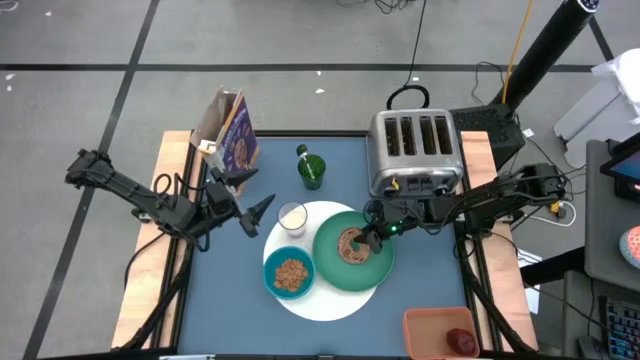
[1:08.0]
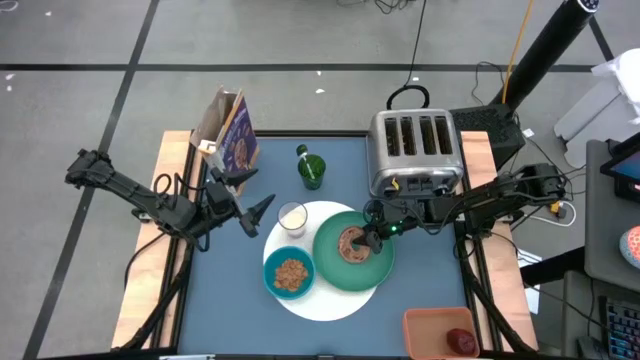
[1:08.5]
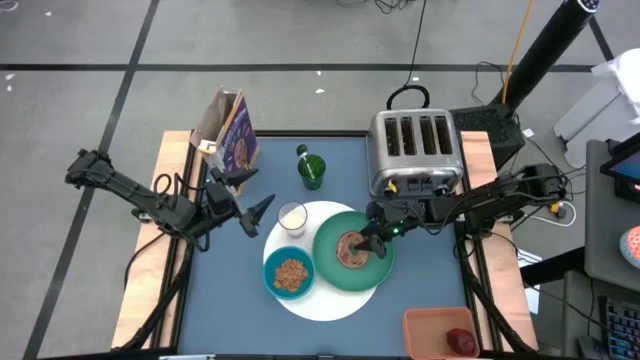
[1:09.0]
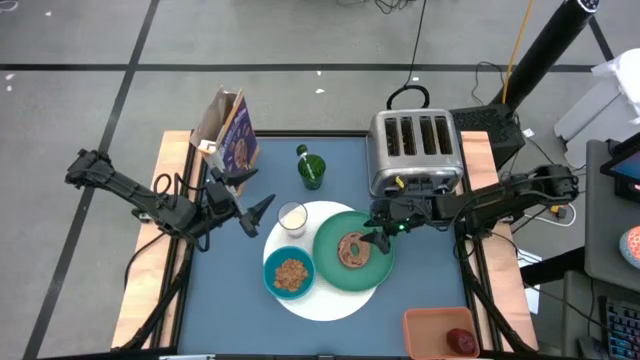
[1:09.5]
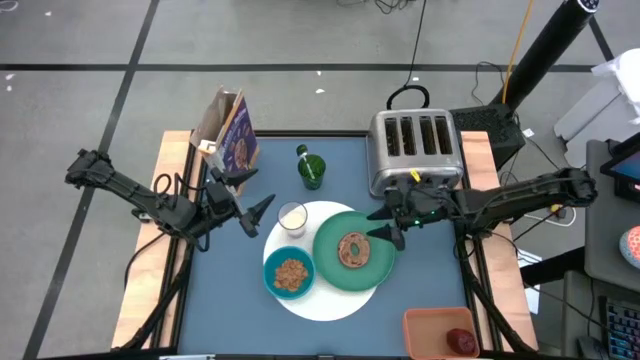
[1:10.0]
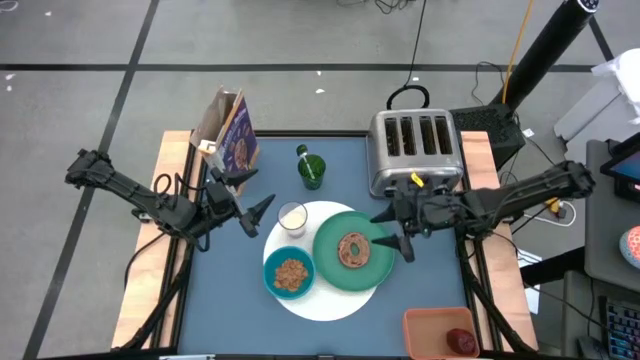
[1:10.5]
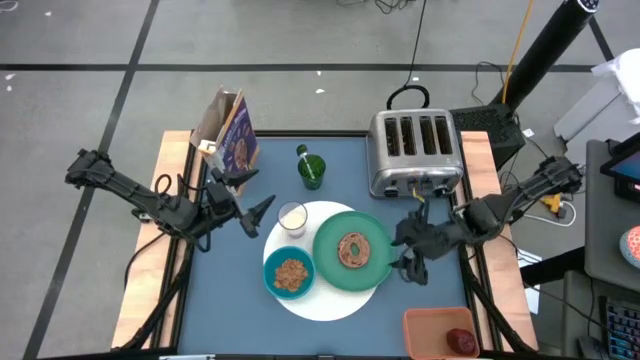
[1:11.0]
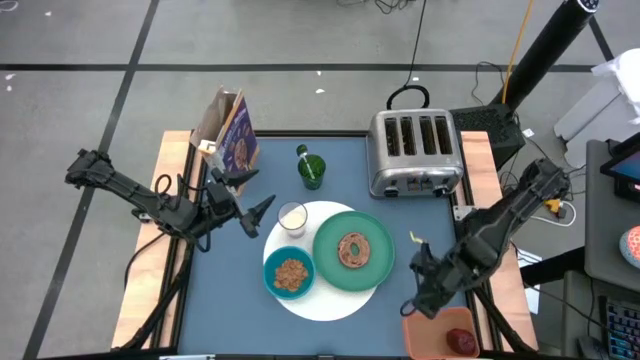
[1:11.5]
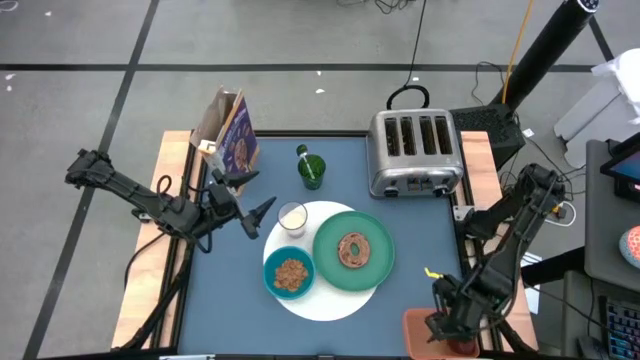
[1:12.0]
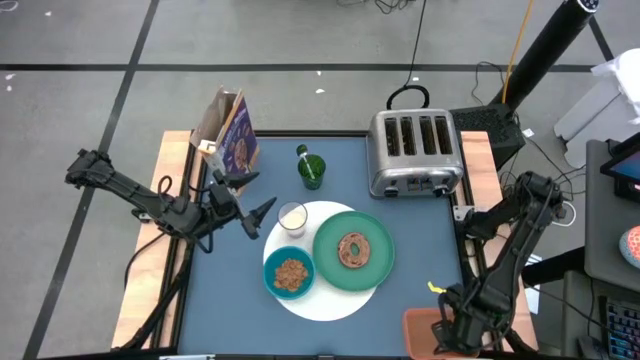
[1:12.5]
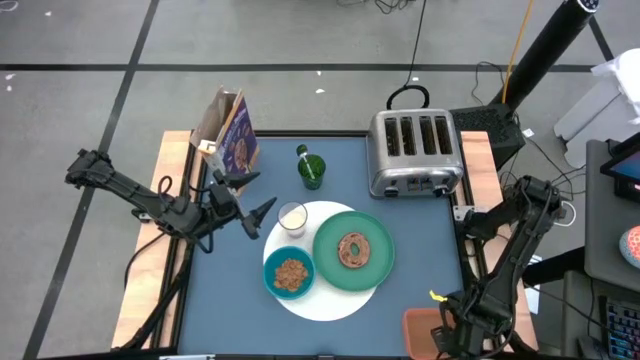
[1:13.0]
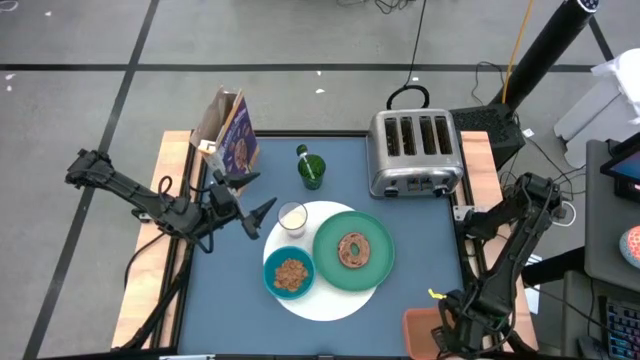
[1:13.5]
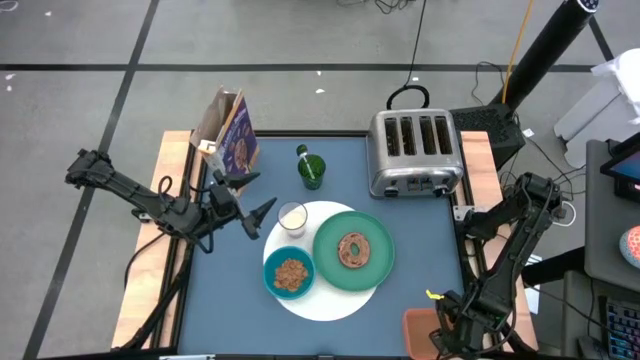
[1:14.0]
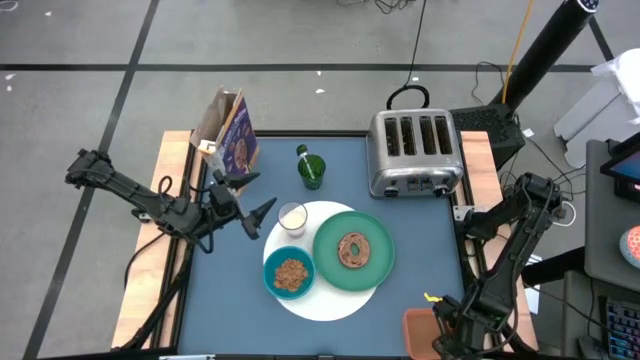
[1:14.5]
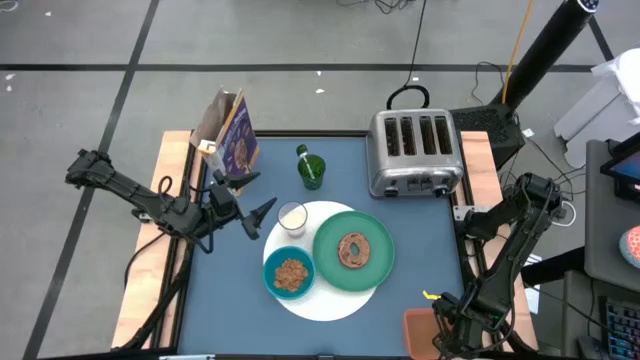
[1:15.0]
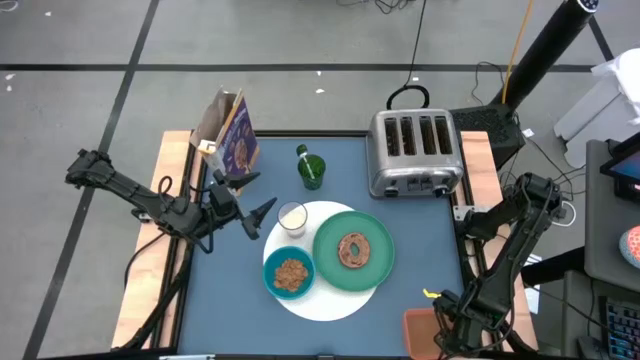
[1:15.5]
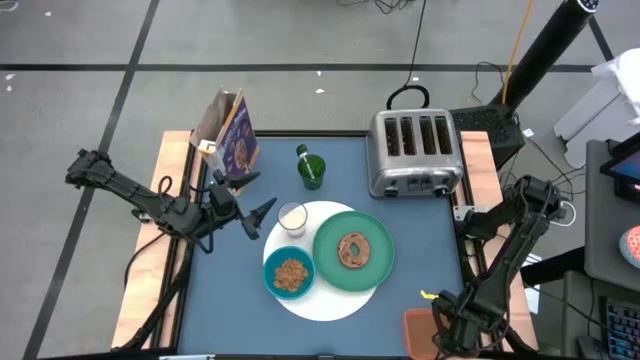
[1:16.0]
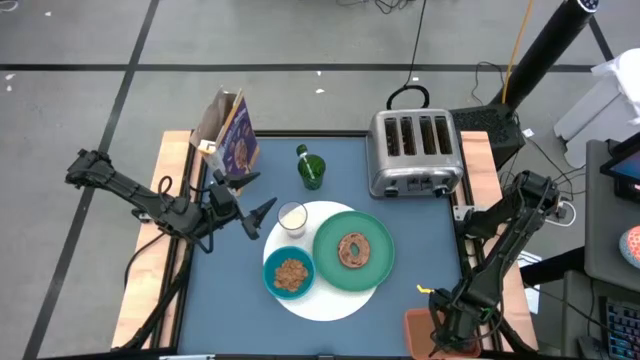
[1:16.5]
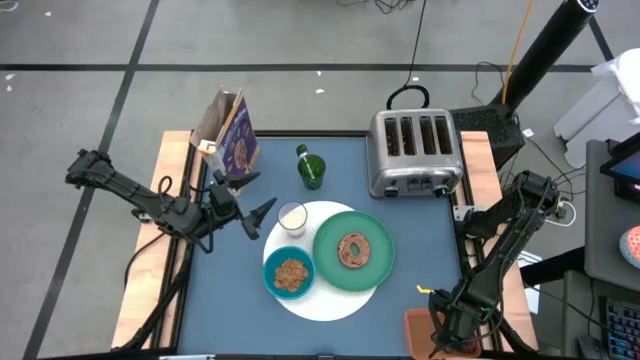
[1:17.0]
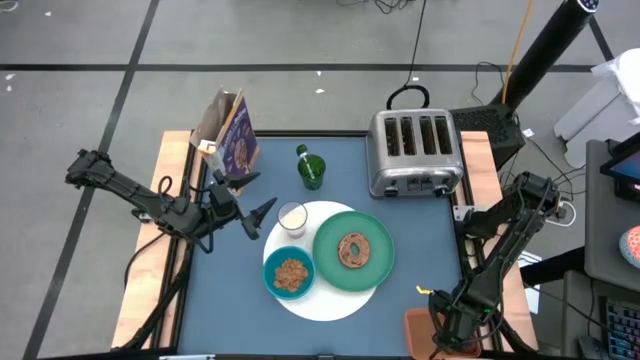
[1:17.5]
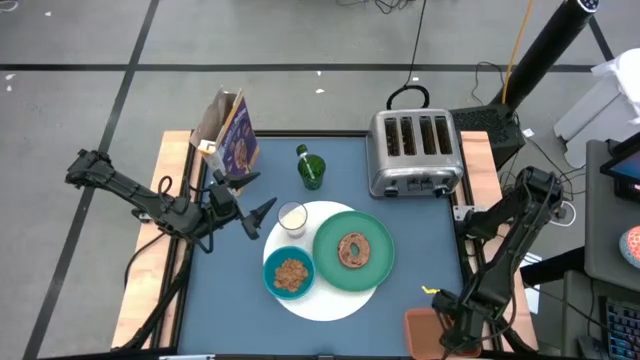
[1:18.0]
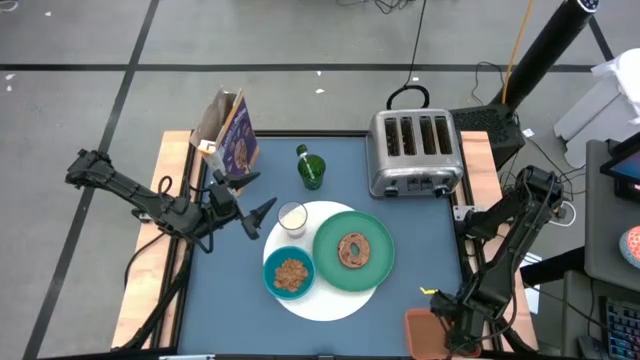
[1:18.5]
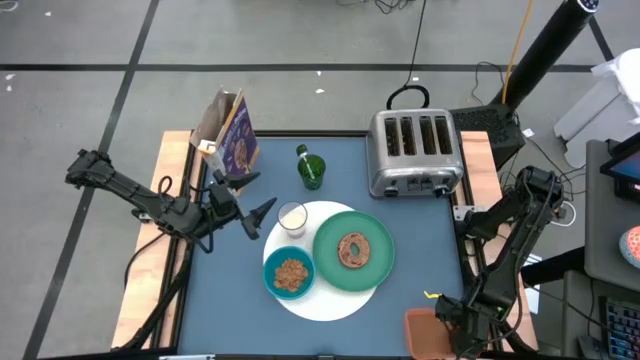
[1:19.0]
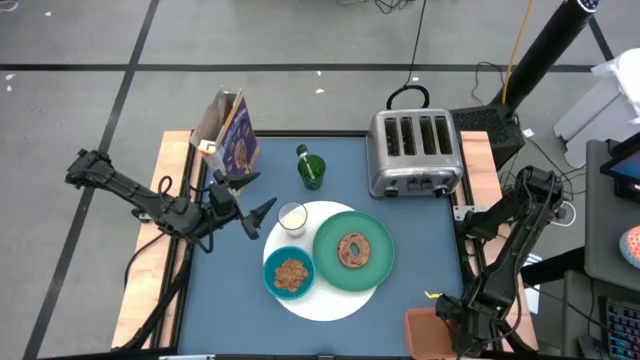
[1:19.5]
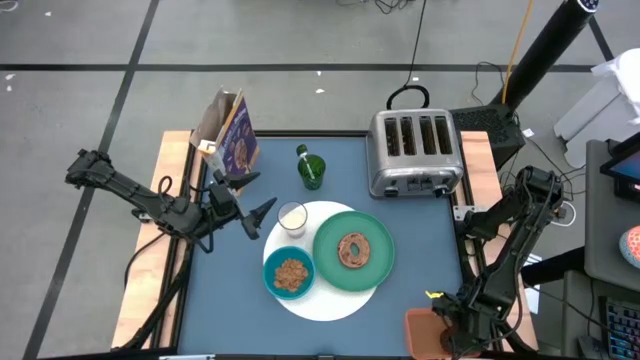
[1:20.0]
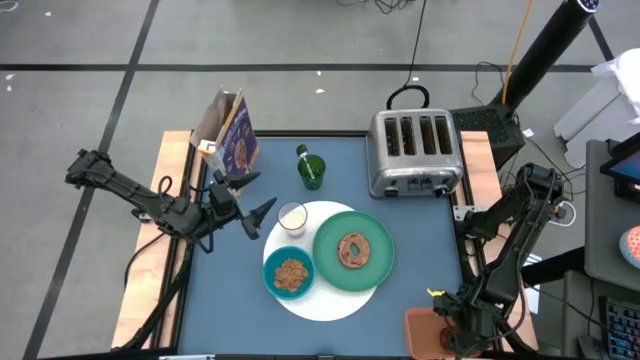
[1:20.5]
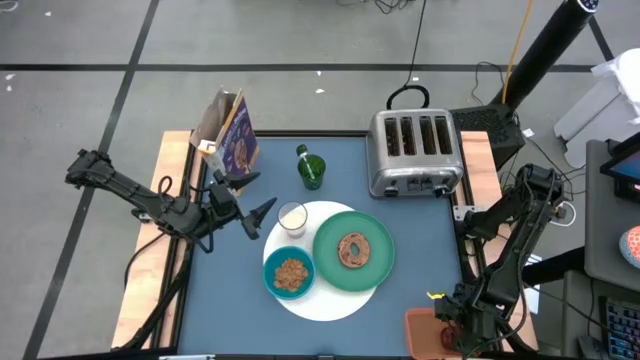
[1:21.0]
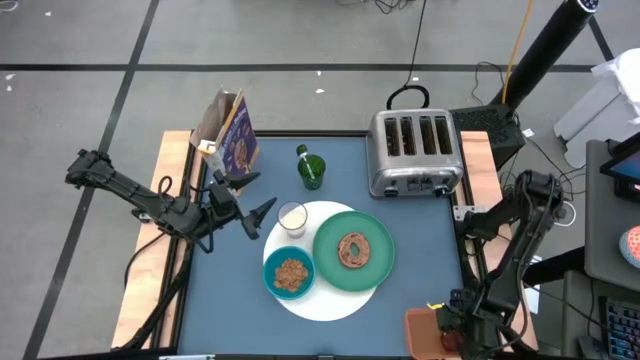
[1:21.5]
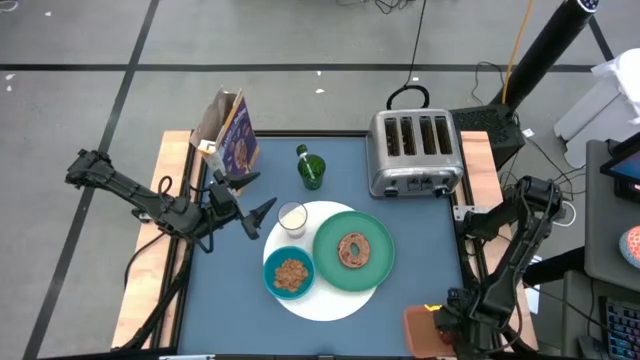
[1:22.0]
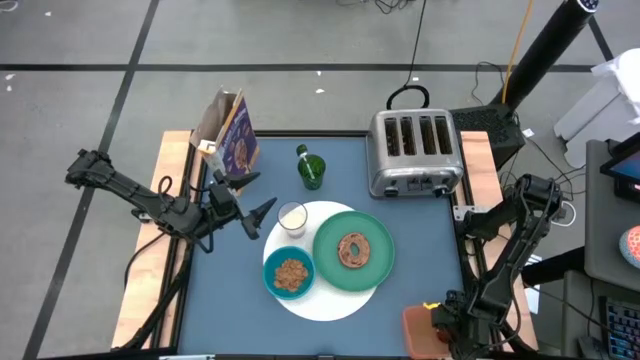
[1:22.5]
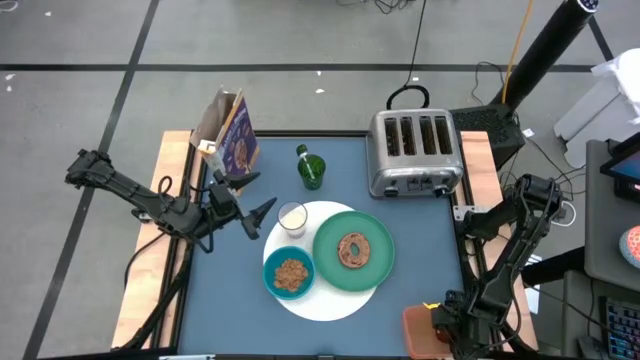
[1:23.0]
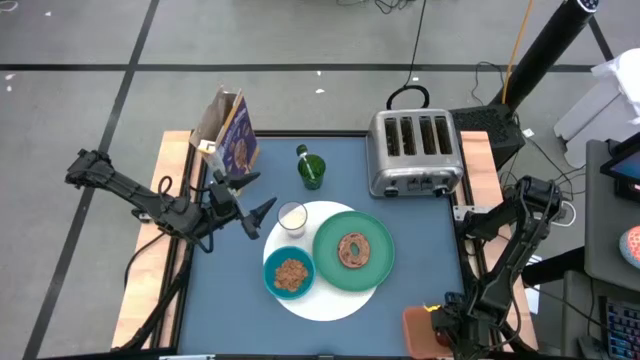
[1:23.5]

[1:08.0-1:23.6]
Task: Arrange a breakfast setting
Put the apple above the green plate from the orange bin

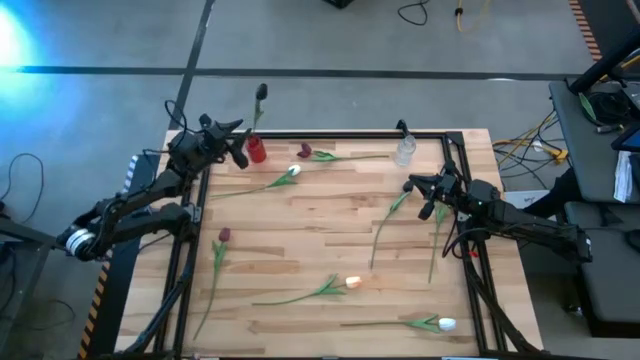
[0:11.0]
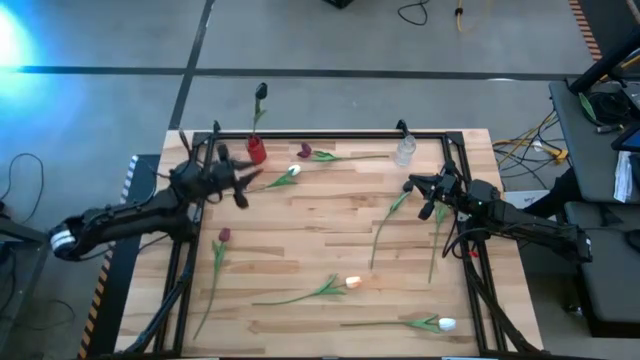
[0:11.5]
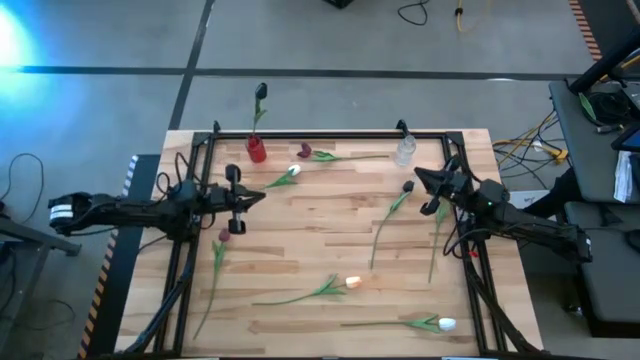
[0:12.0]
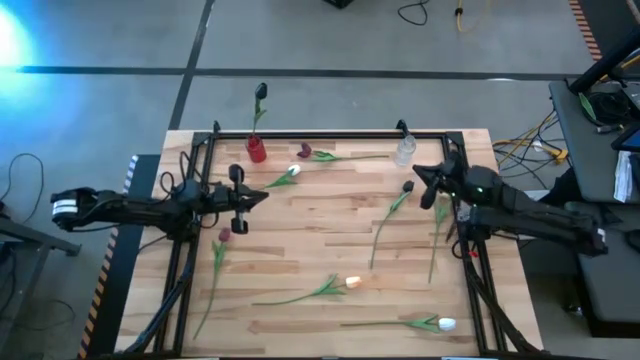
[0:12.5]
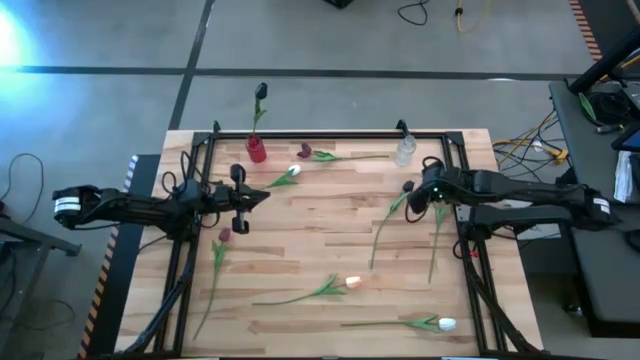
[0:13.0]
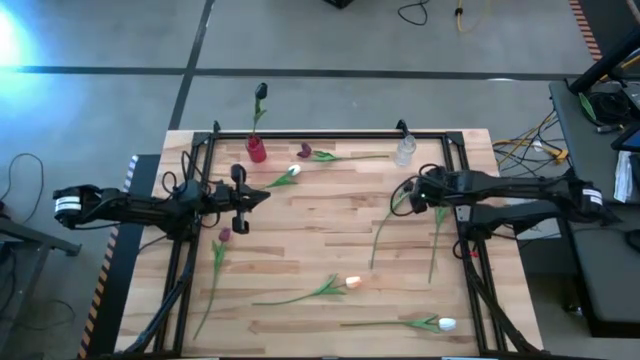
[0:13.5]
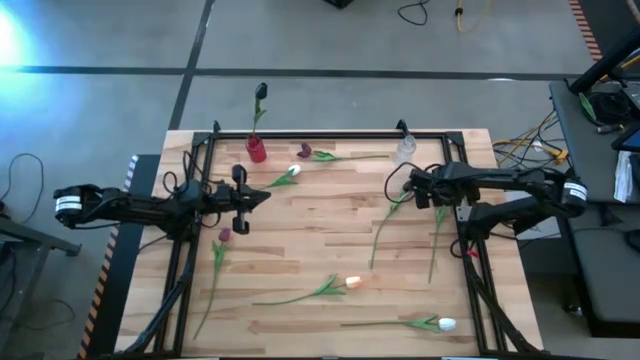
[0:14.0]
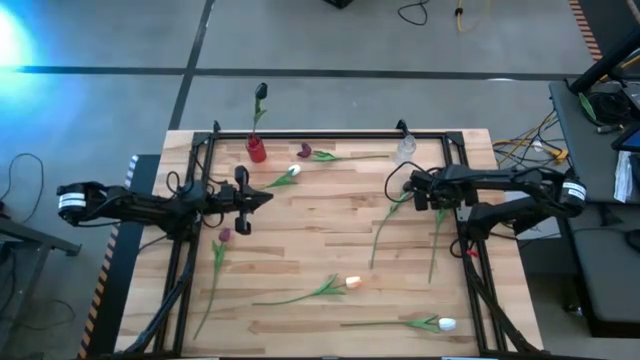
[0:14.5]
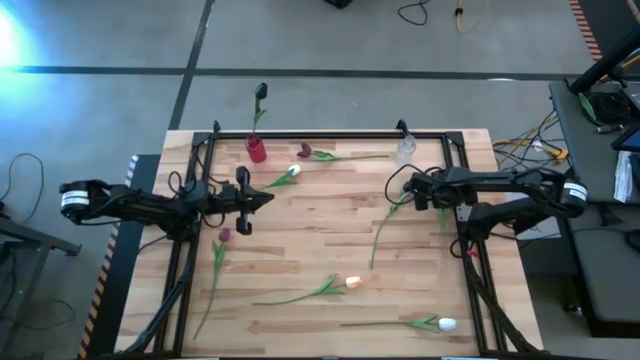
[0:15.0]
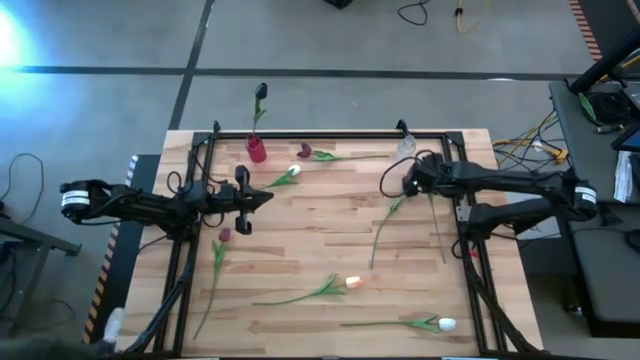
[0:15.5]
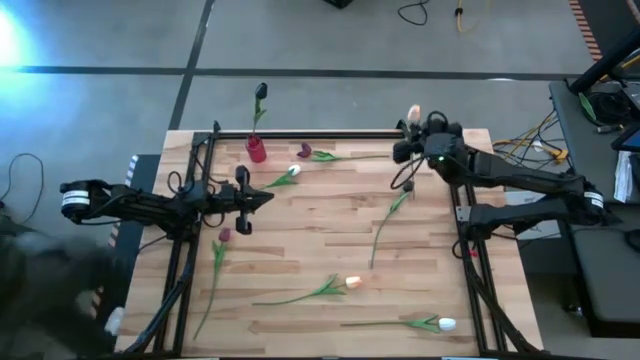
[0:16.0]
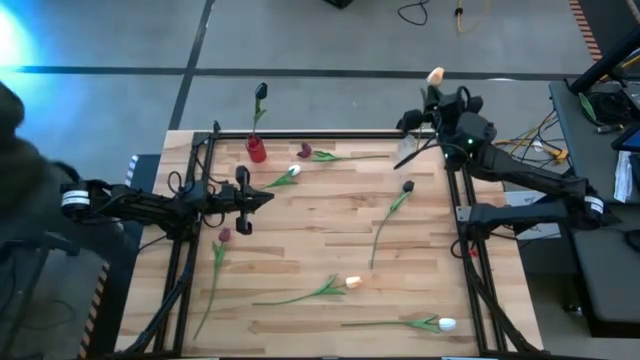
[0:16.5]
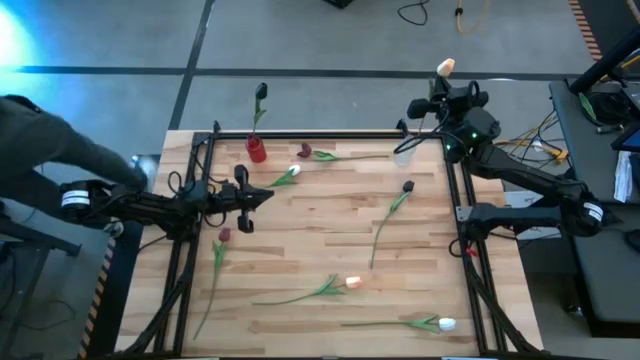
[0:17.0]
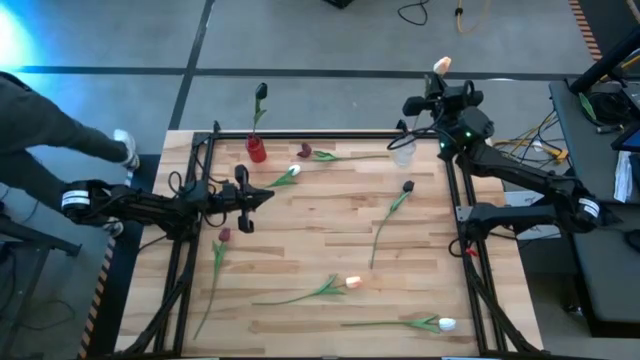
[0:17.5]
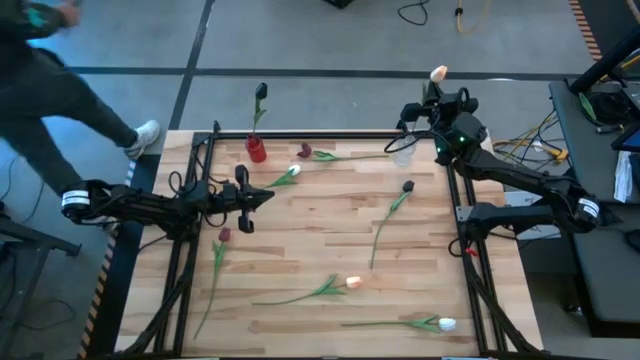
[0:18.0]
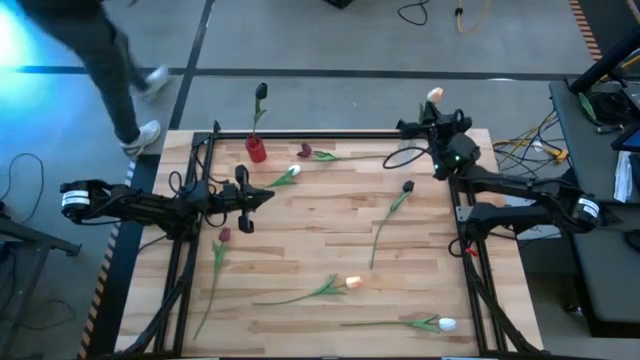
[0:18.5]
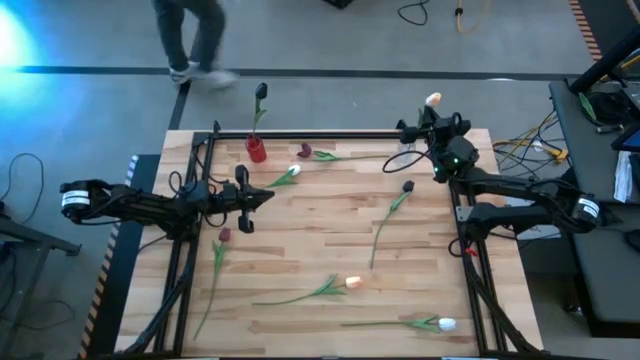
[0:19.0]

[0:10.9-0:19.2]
Task: Sort flowers into vase by color
Put the top light pink flower into the transparent vase
